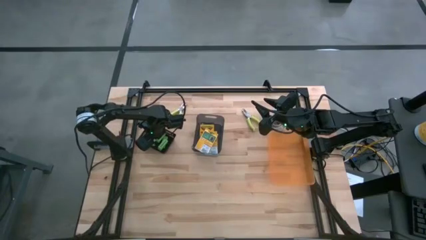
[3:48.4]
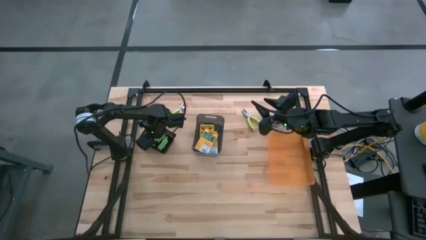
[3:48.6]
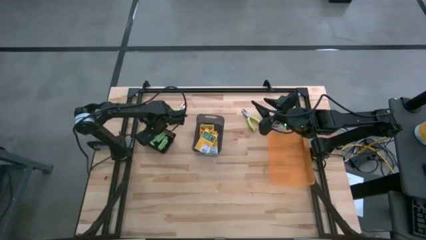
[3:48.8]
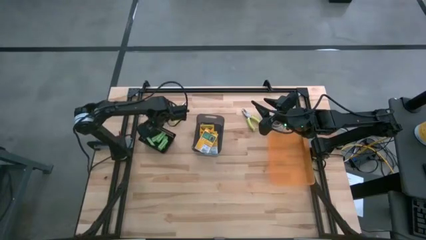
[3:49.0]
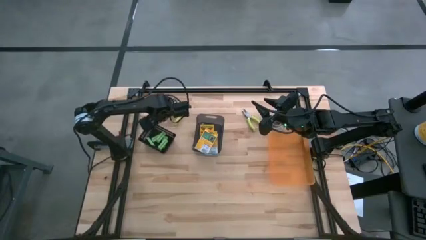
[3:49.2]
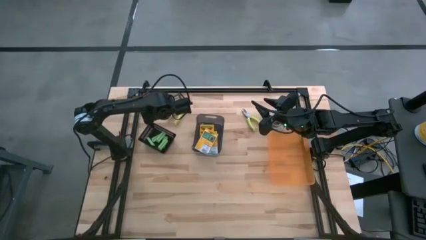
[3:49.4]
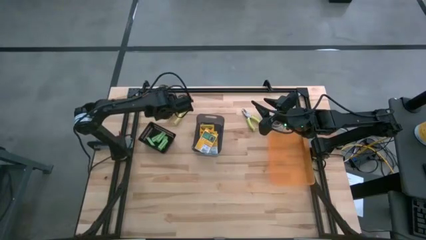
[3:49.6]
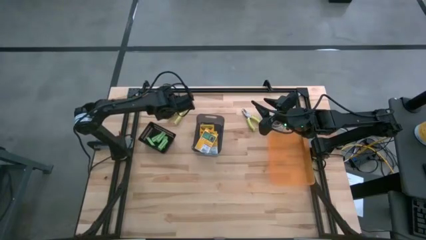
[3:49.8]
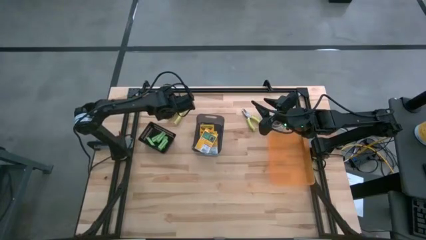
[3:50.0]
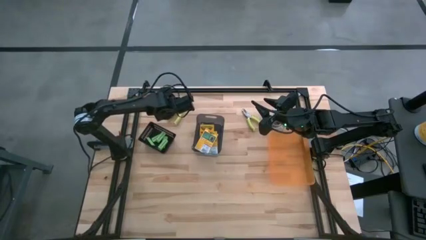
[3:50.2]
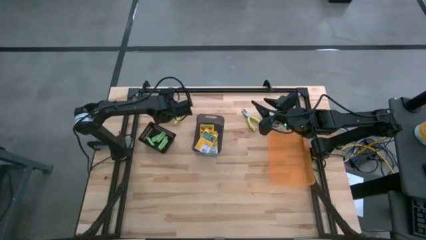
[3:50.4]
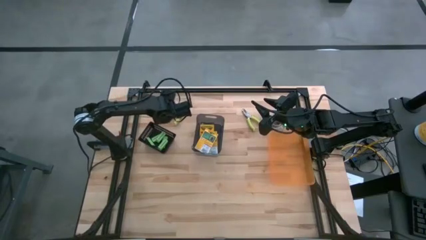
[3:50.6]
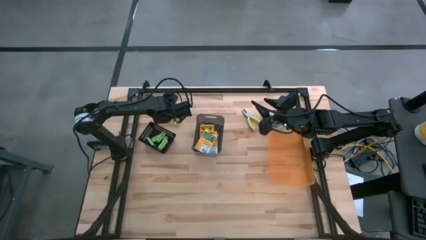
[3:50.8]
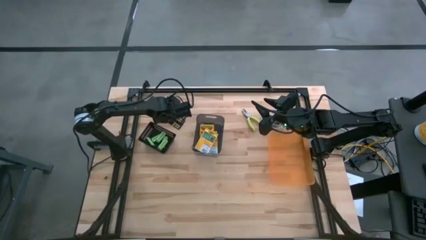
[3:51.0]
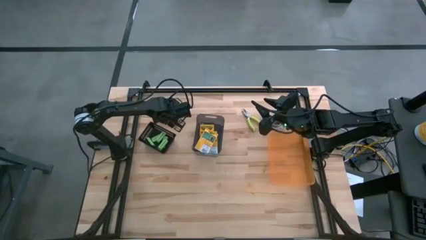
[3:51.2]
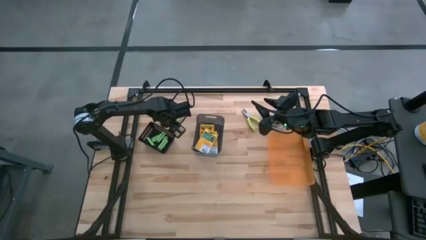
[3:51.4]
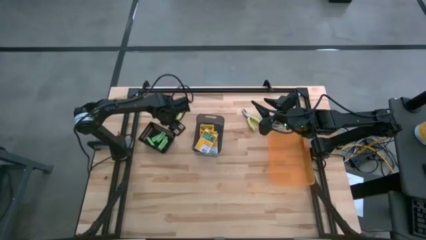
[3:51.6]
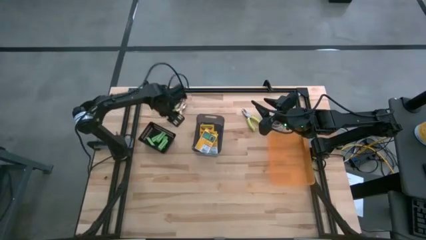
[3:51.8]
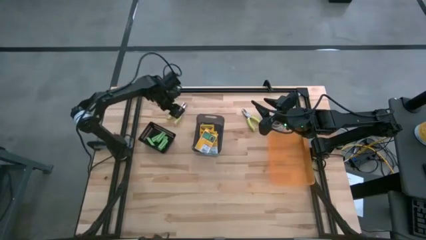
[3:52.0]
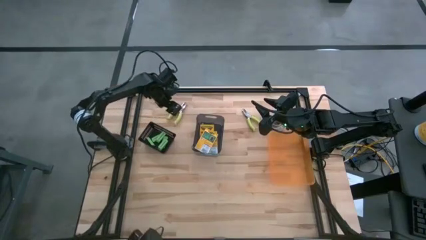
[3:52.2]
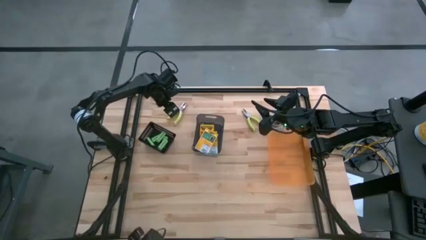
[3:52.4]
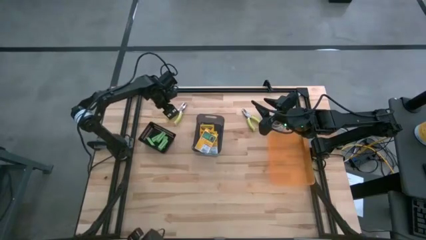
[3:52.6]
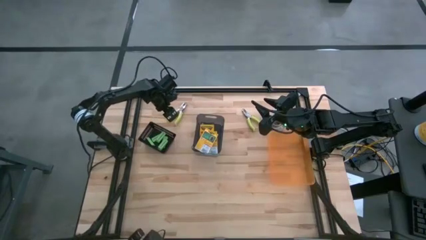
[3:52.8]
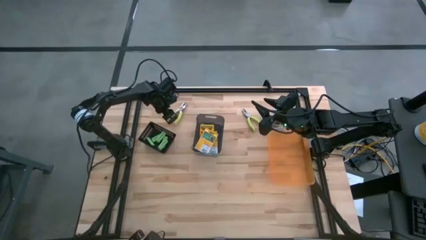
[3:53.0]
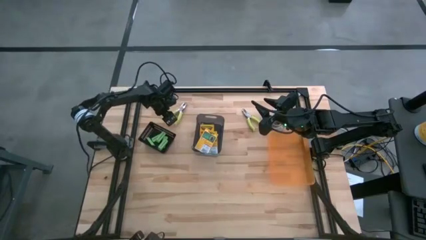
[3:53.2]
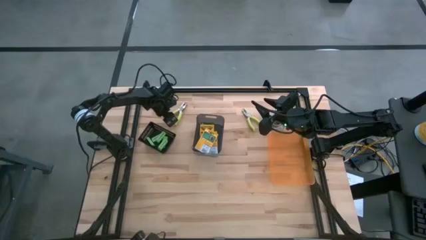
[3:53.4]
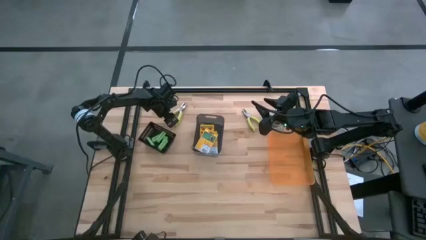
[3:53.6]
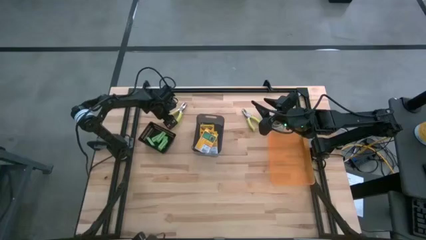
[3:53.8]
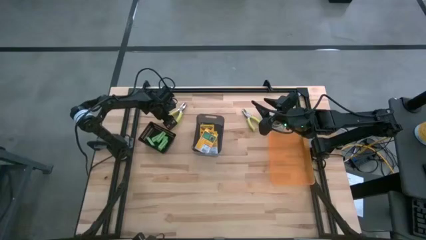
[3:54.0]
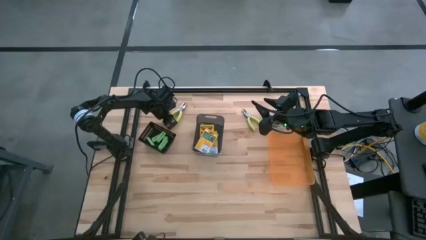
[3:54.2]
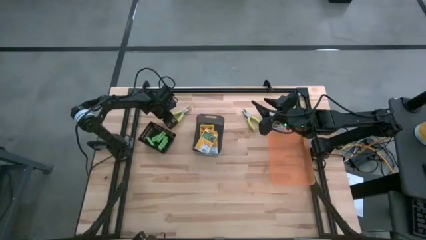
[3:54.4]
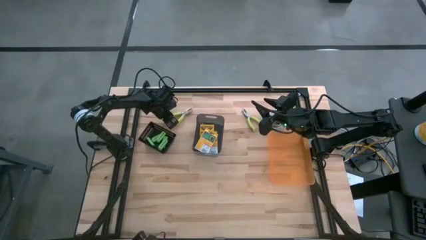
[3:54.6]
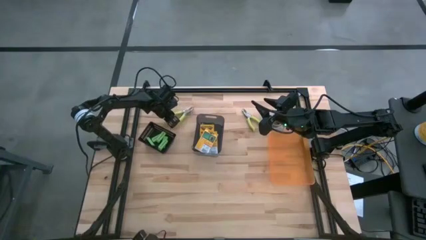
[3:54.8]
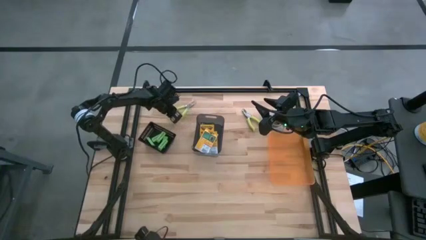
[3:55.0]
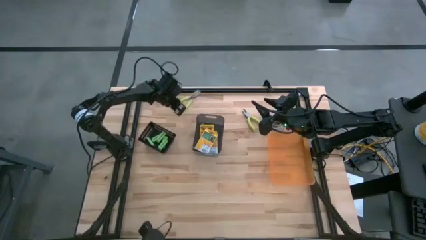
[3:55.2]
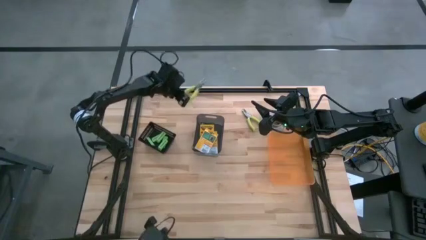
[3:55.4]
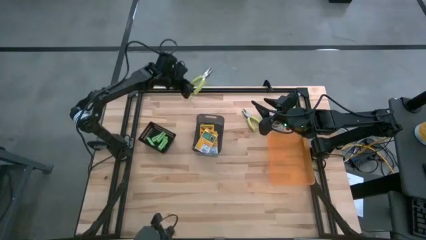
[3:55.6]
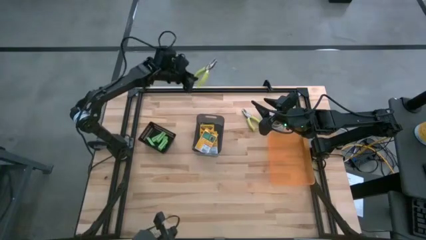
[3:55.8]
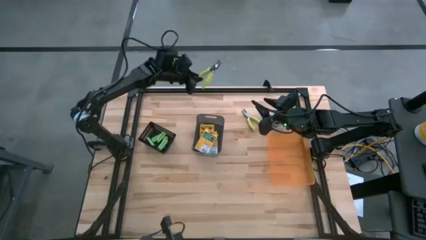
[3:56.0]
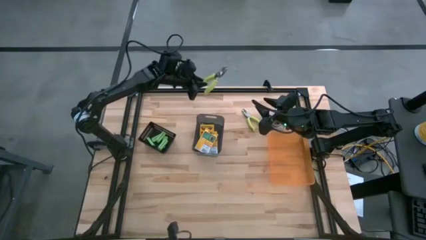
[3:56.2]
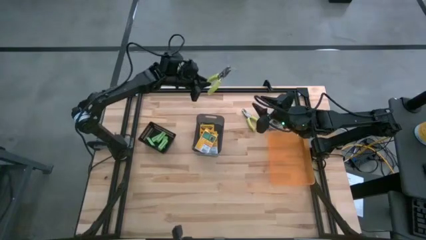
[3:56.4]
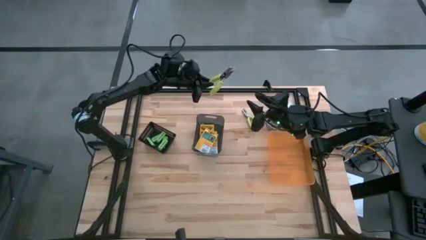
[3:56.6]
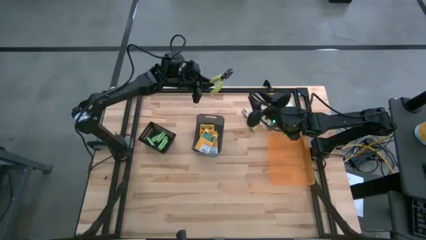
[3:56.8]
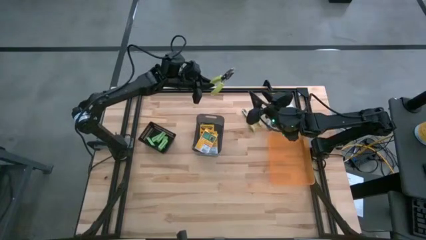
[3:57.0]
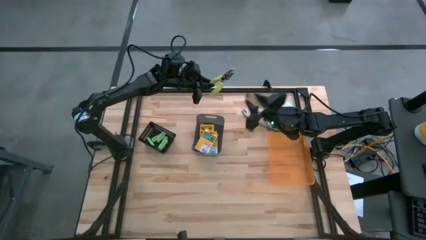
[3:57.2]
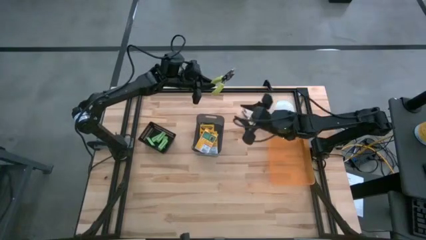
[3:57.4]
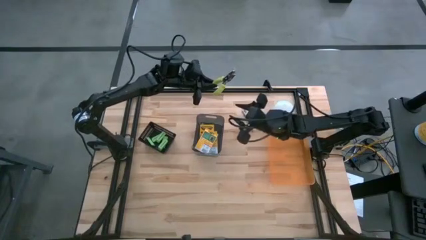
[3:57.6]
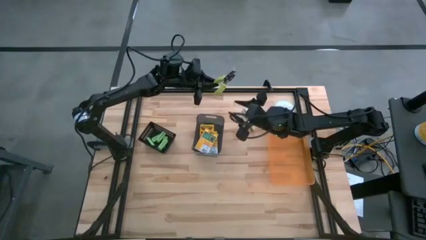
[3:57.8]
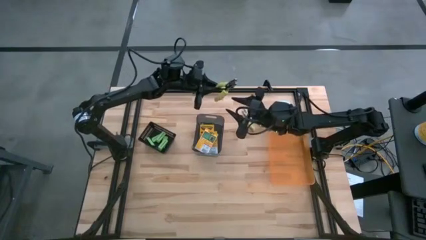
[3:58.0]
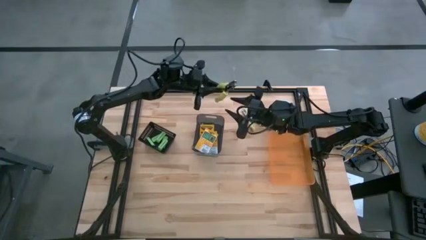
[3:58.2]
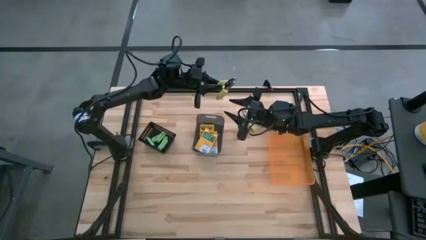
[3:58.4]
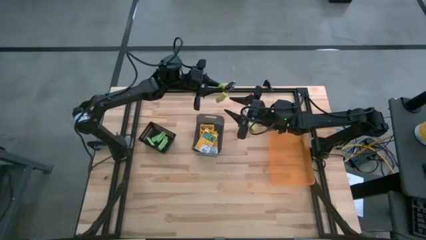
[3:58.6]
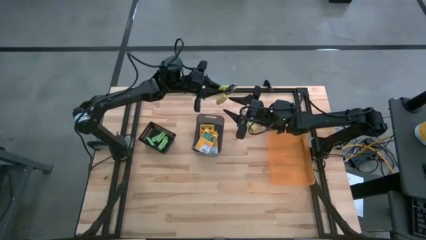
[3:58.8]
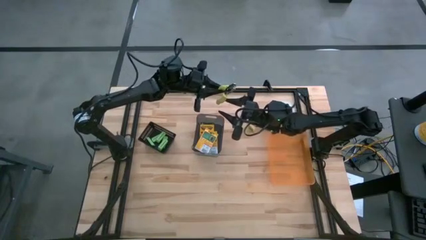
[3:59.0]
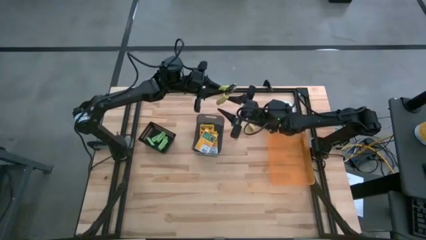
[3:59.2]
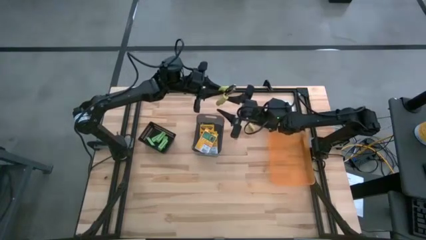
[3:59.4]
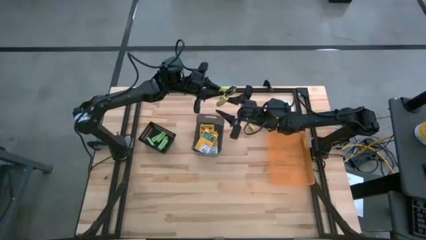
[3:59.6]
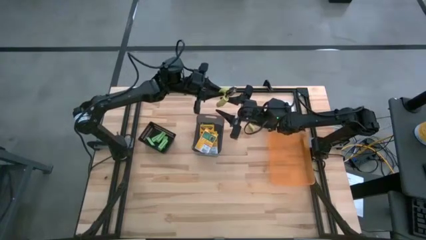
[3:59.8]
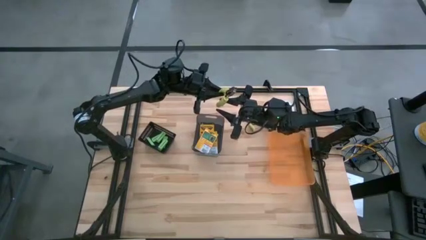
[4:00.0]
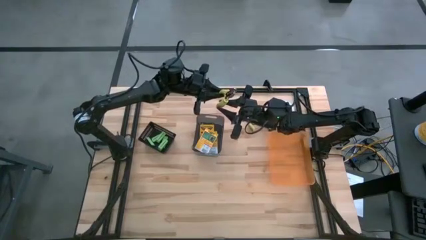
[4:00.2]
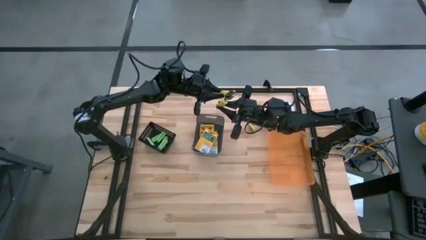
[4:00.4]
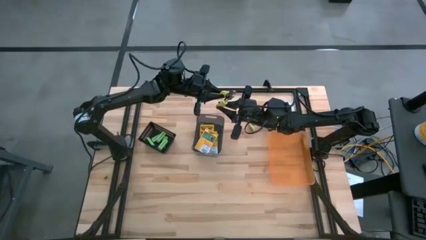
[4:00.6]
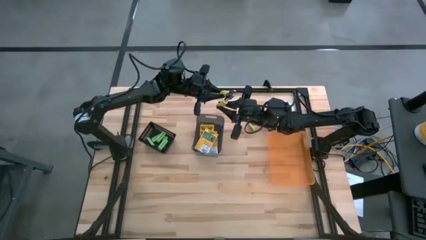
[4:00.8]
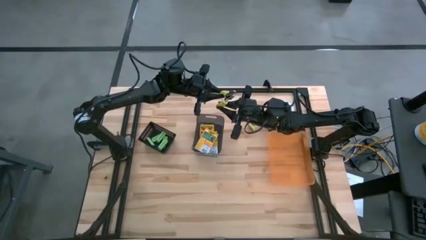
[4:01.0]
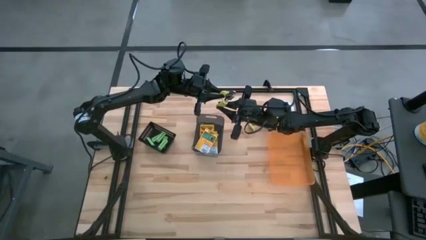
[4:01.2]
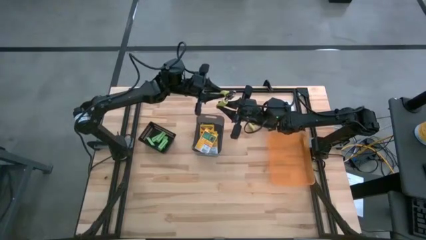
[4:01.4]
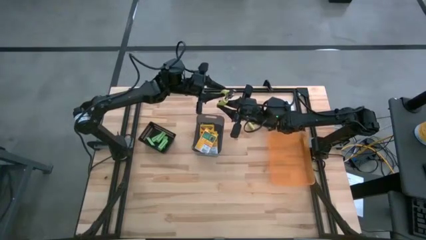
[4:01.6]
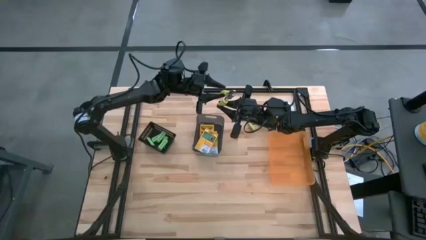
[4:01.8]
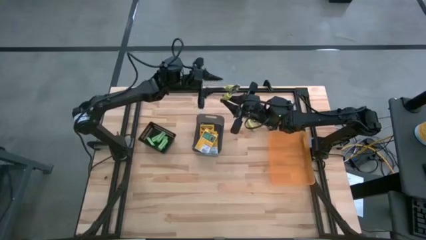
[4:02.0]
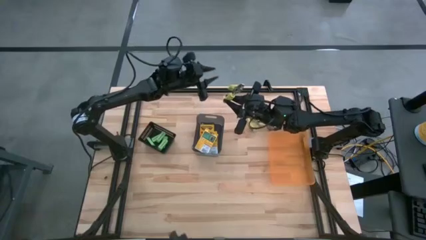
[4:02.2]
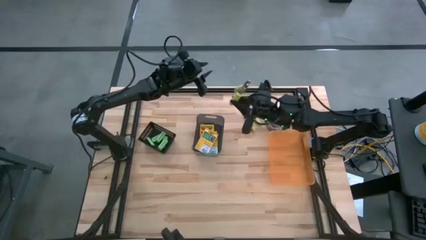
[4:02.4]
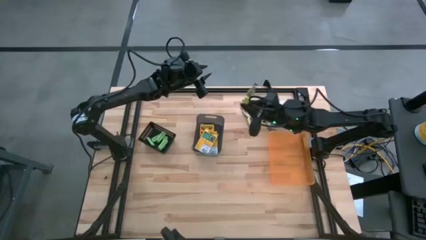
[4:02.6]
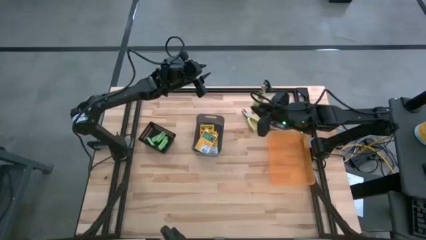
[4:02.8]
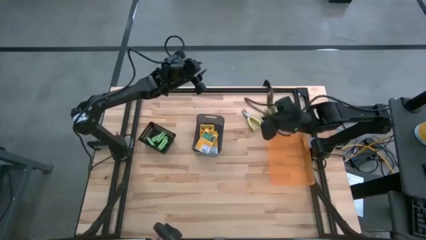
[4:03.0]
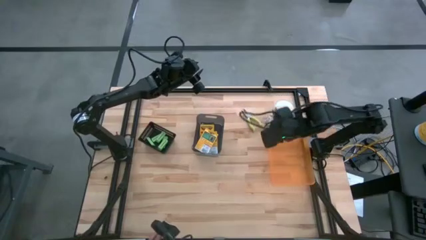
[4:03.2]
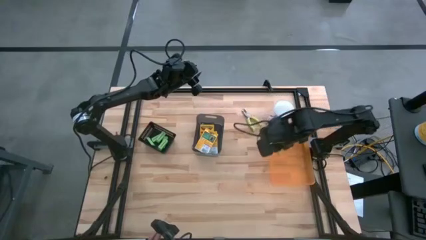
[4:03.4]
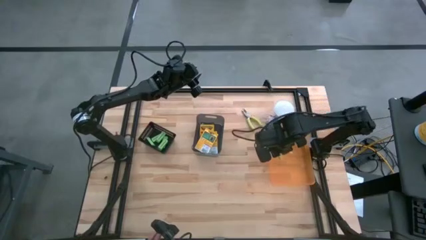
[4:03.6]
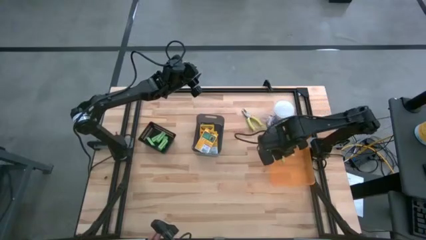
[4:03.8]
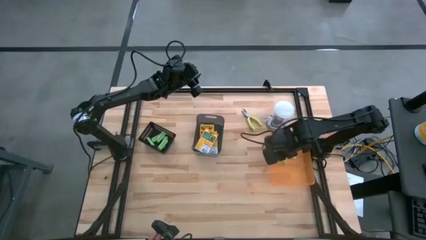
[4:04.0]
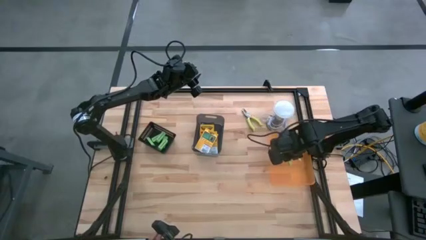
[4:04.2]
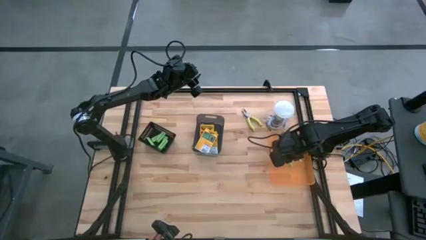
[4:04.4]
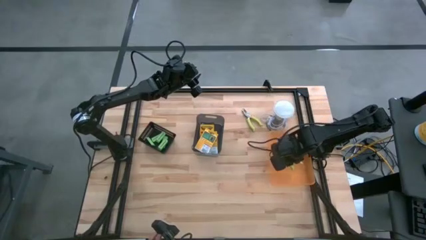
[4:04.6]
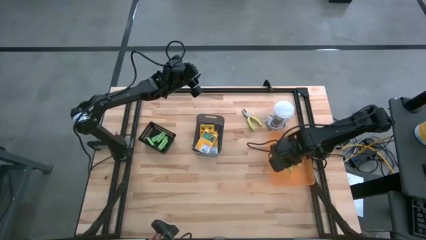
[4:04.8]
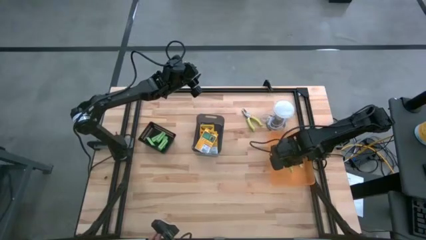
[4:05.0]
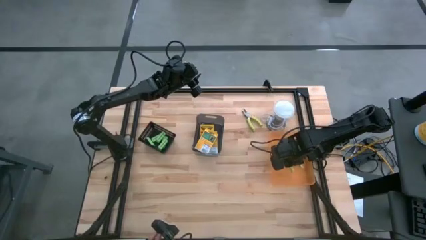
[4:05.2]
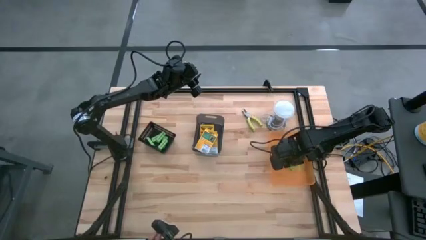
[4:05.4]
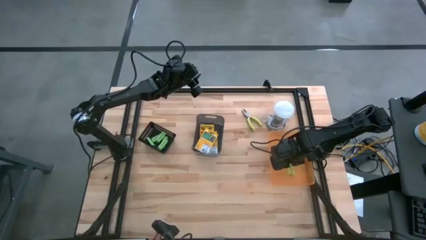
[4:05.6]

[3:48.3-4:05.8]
Task: Pick & Place School Supplies
Put the left light green hole puncher into the orange bin
